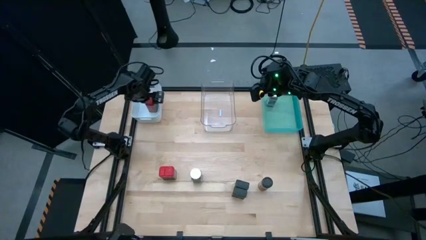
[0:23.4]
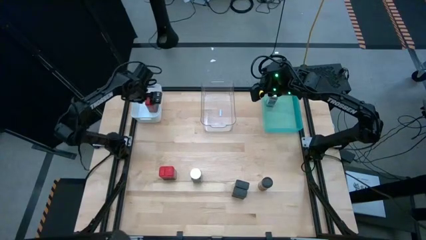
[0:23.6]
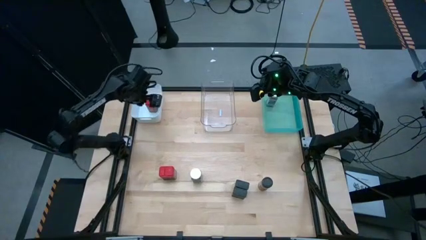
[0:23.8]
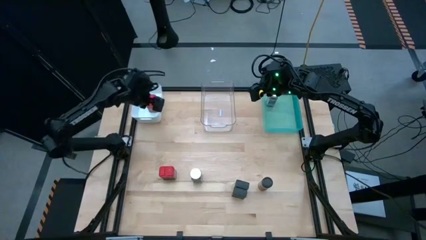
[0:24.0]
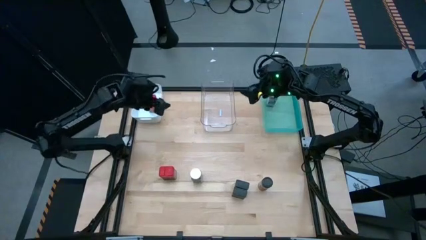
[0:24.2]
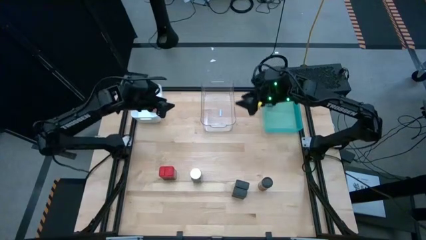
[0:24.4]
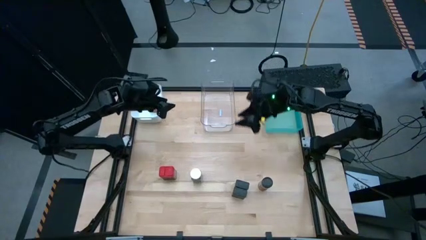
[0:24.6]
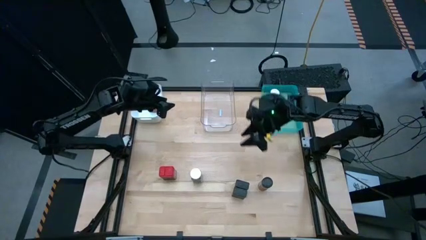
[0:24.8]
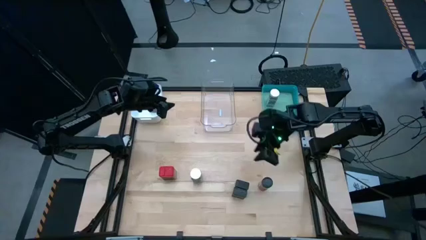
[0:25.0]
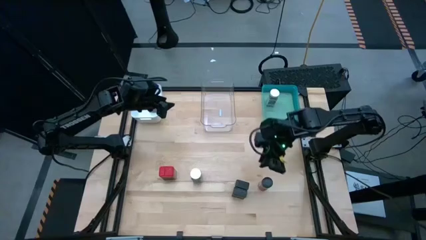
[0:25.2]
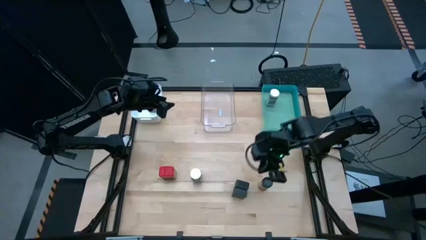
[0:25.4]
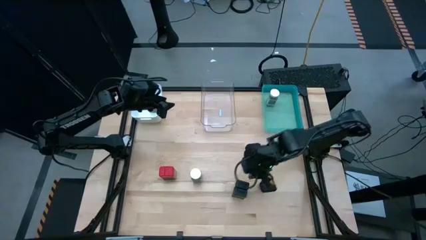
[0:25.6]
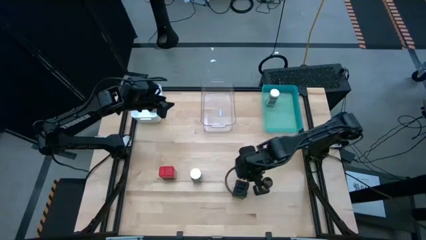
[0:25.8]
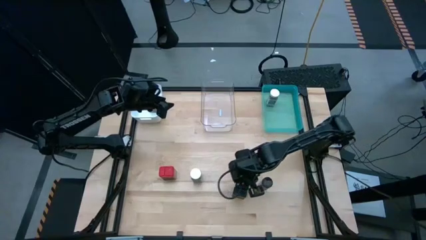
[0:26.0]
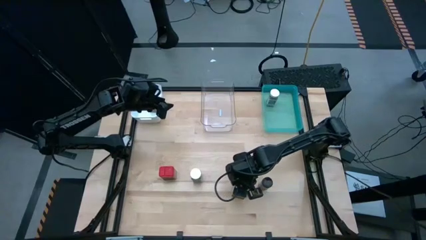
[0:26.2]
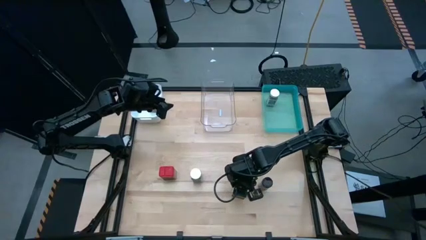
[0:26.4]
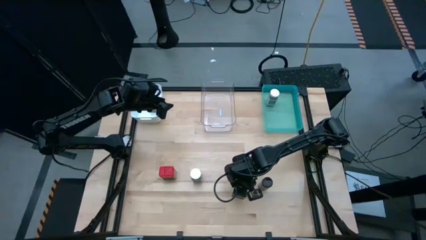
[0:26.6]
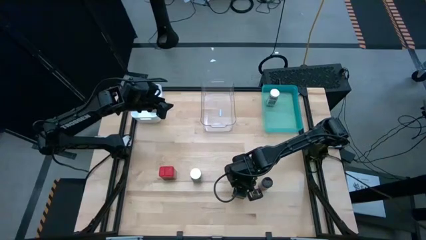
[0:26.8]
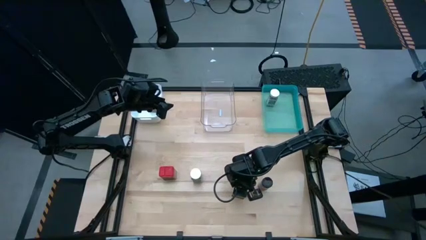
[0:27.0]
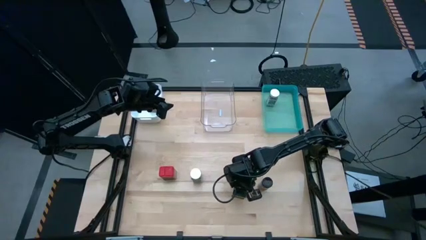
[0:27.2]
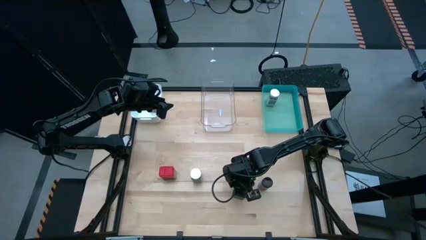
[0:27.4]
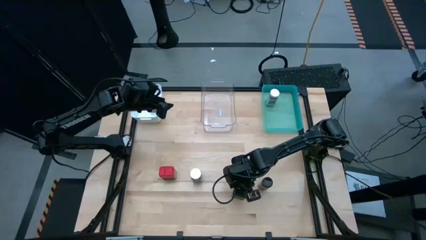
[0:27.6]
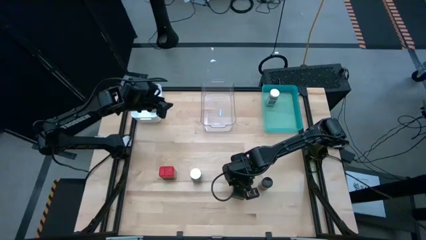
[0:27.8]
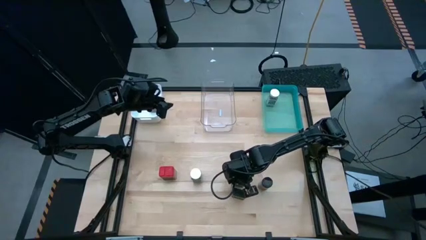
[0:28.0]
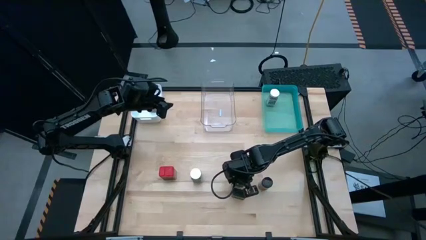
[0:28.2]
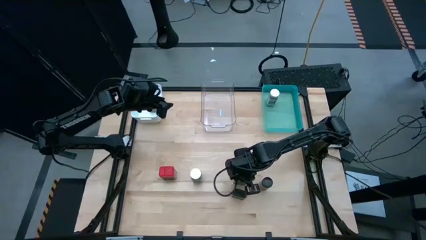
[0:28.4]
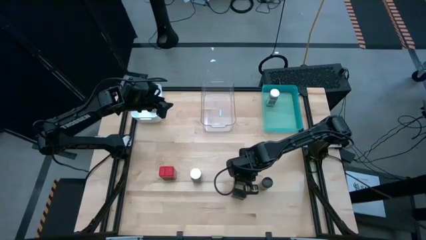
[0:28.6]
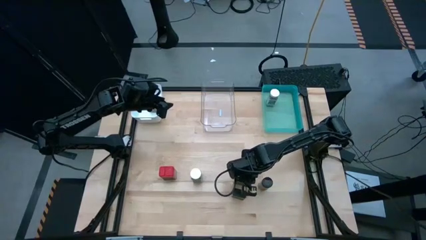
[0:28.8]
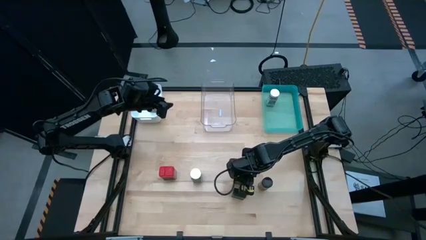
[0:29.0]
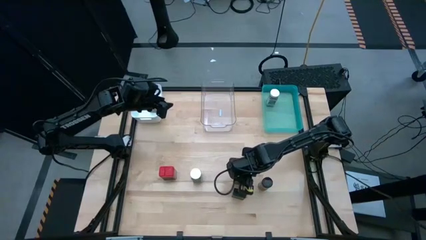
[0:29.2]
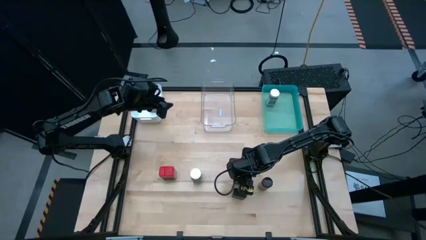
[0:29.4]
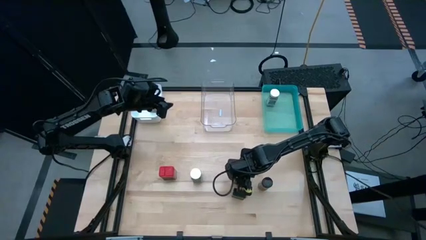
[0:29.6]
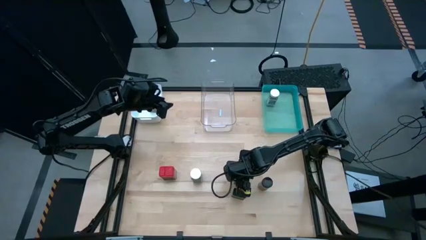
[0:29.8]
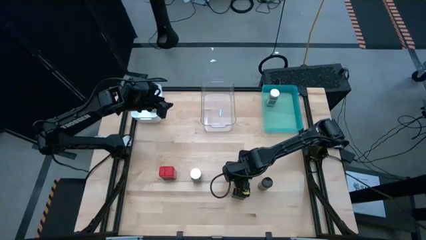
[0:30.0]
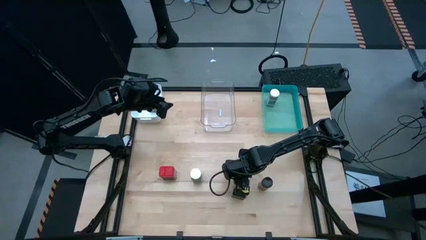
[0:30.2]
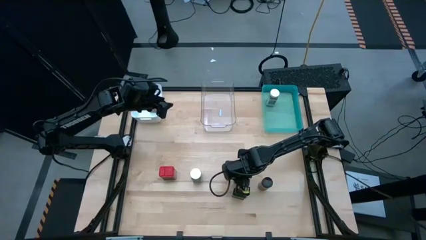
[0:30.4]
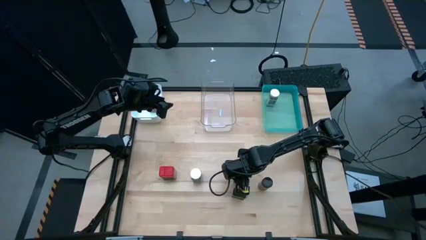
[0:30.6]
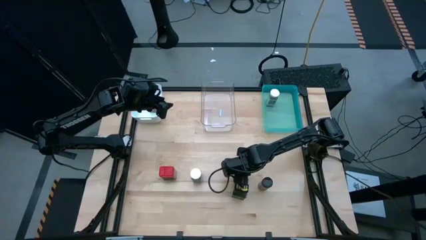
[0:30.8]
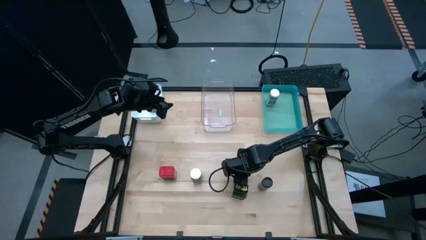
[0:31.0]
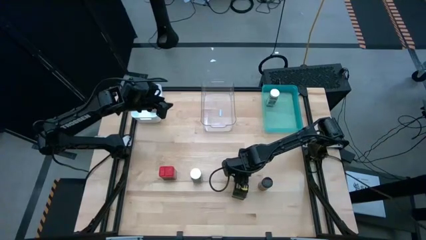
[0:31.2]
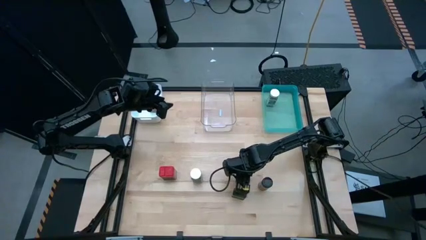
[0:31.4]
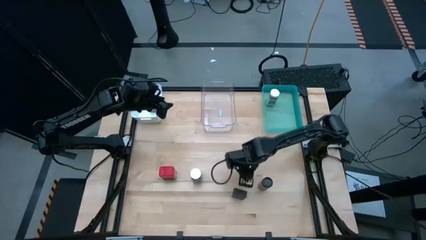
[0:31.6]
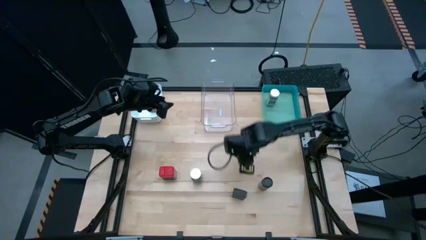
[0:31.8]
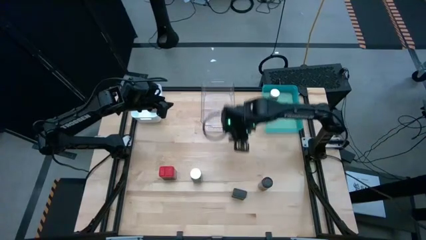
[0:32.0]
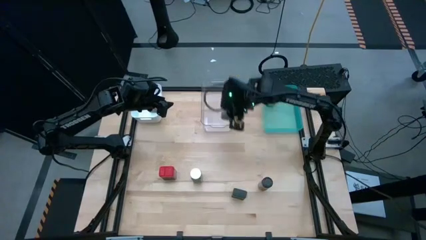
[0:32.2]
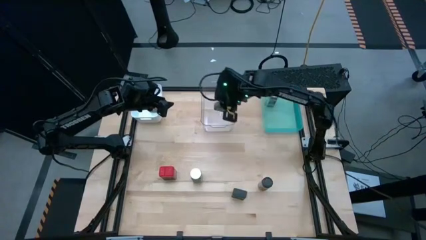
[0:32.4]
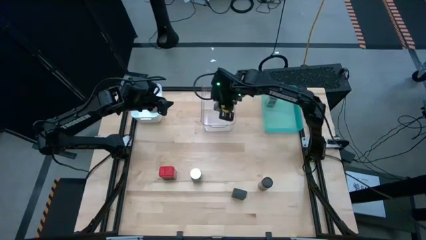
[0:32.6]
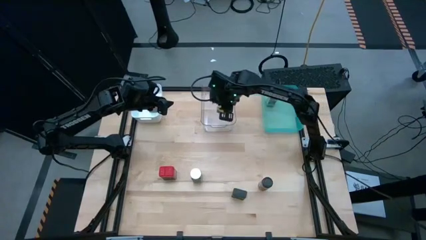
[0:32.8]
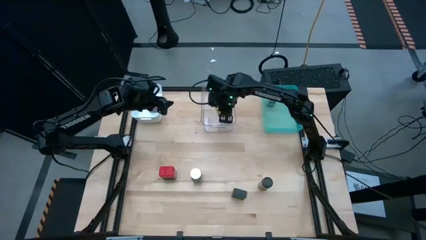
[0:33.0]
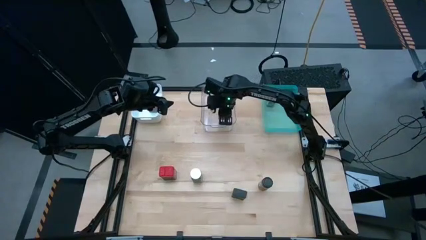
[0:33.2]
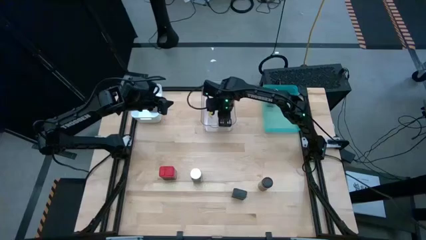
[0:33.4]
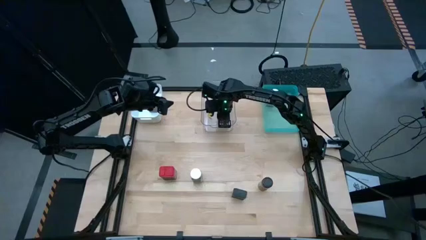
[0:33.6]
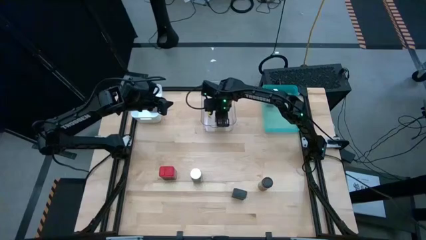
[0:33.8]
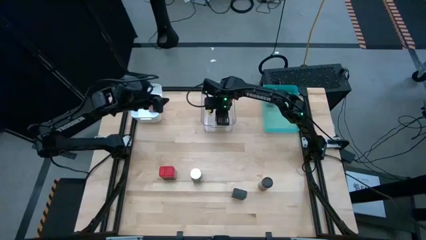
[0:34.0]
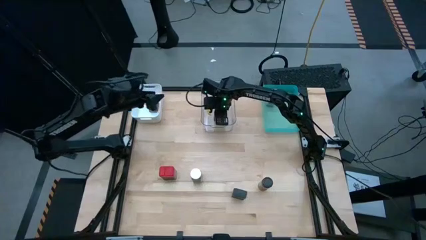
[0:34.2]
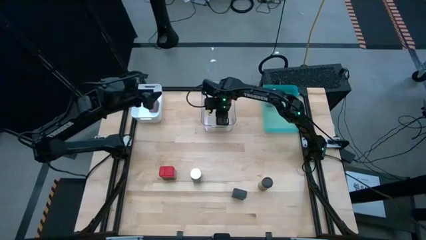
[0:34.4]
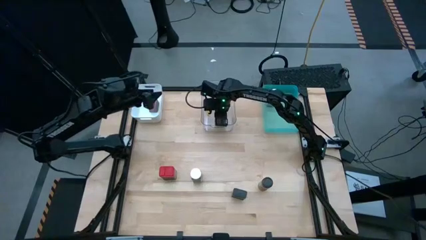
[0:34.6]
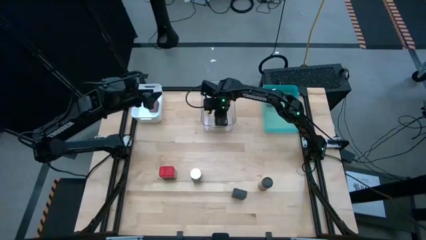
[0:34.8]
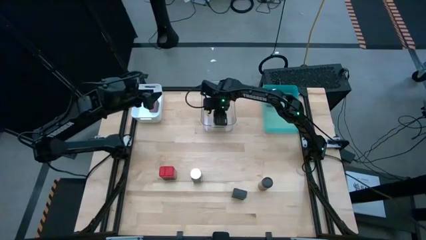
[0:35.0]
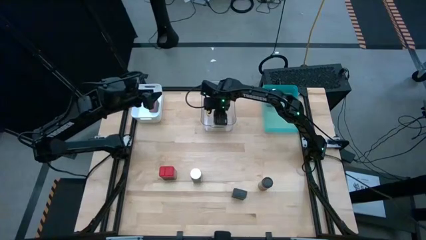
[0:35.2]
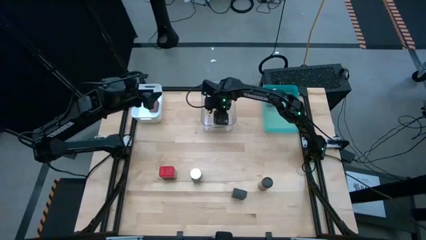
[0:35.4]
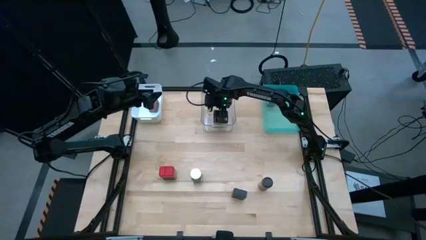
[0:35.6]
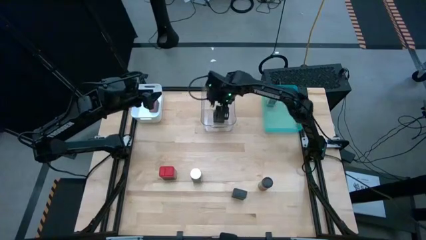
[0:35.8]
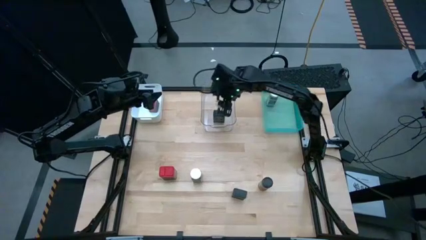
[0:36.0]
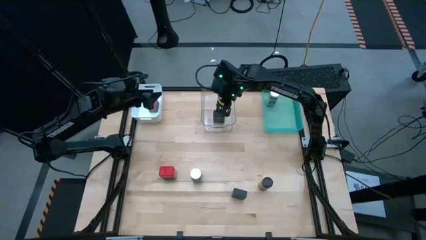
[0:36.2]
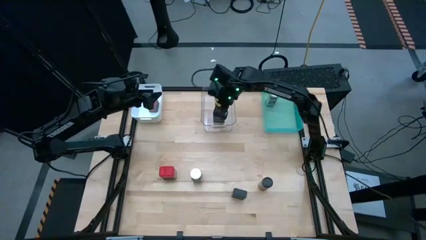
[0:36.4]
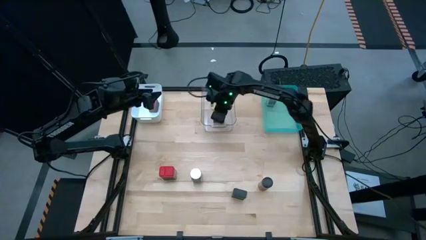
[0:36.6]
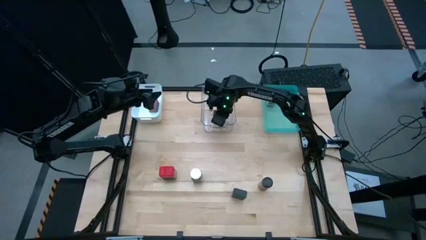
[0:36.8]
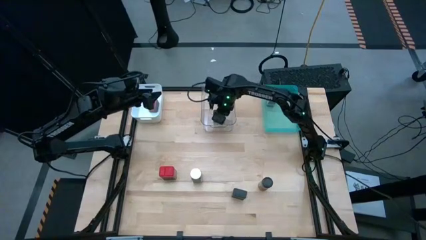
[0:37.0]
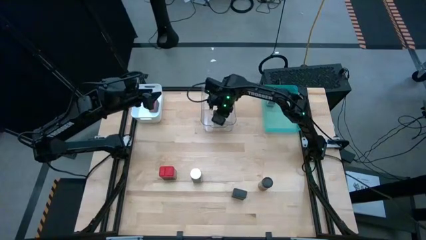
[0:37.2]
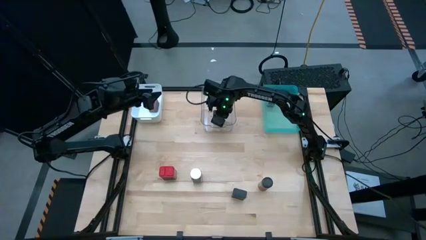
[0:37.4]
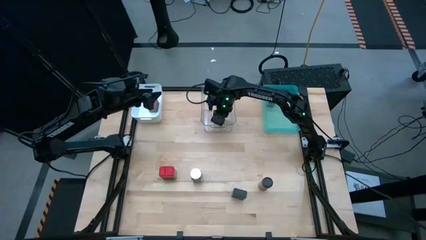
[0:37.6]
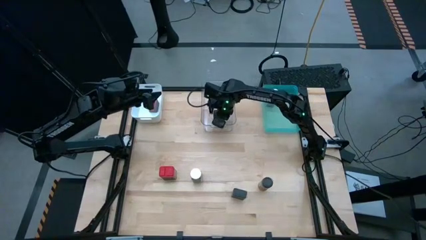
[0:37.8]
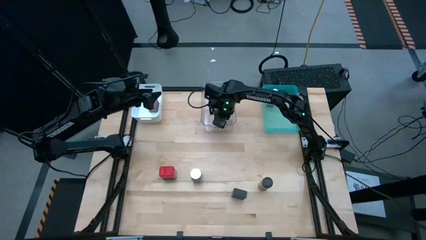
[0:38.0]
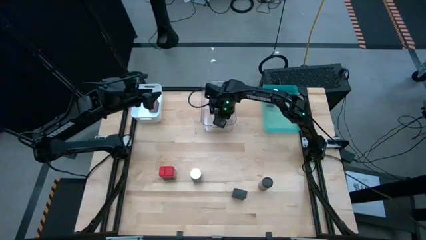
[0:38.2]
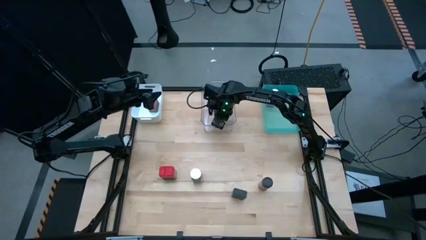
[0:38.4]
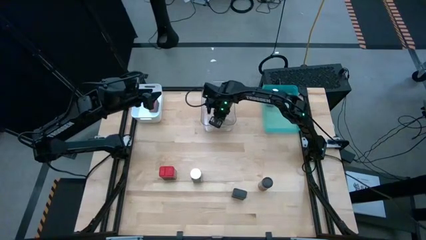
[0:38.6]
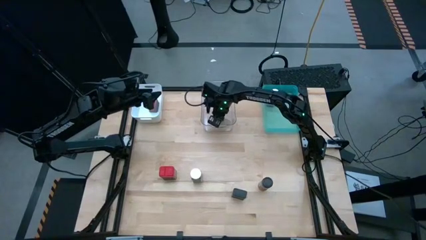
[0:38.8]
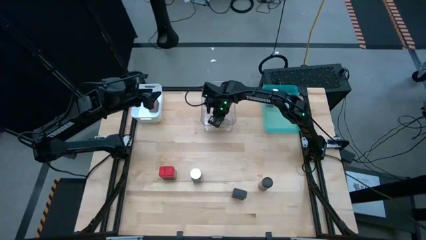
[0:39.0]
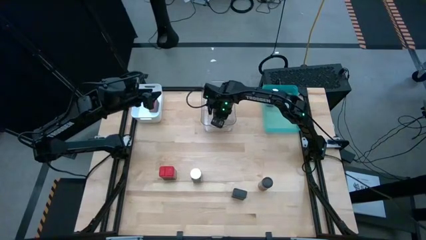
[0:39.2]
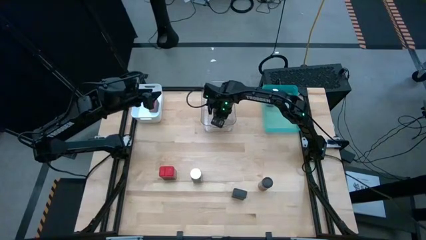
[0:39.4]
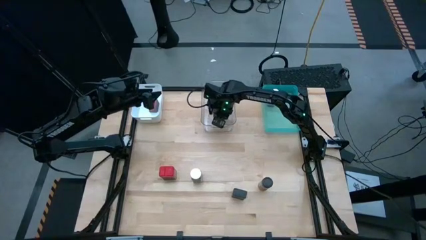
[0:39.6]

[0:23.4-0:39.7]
Task: Sort spices by type
Put the top black seasoning can into the transparent bin
